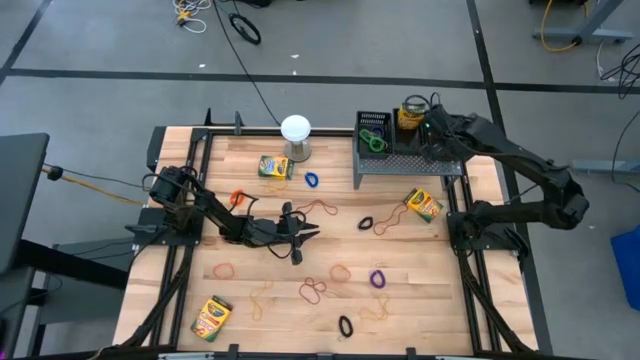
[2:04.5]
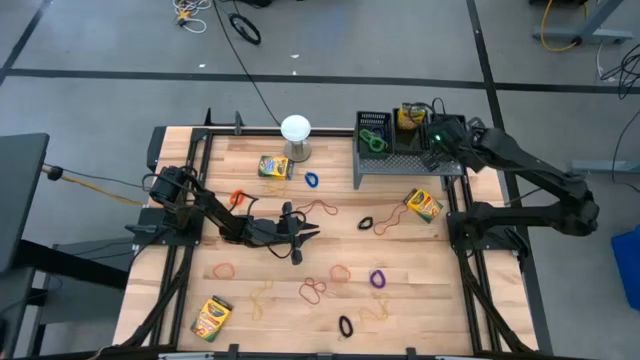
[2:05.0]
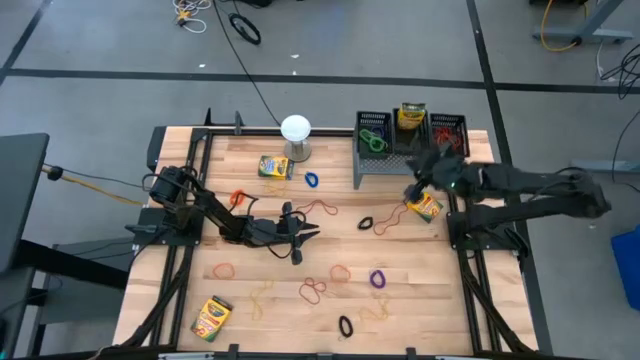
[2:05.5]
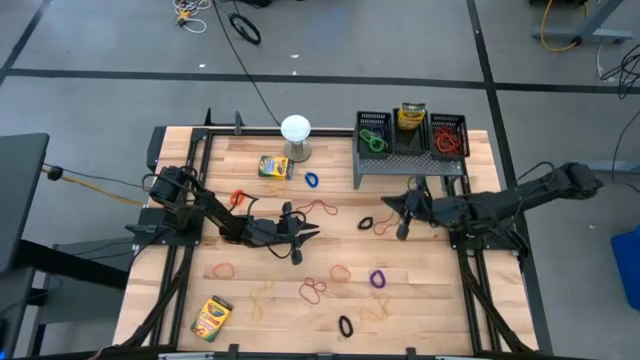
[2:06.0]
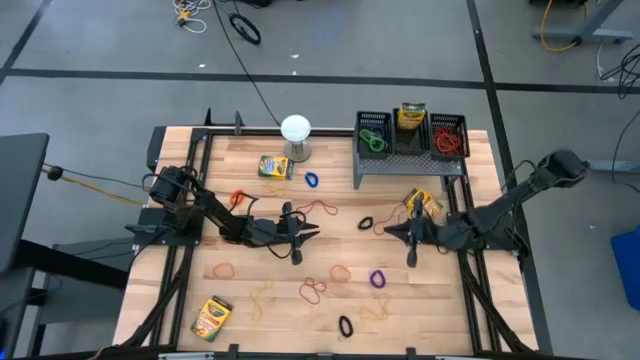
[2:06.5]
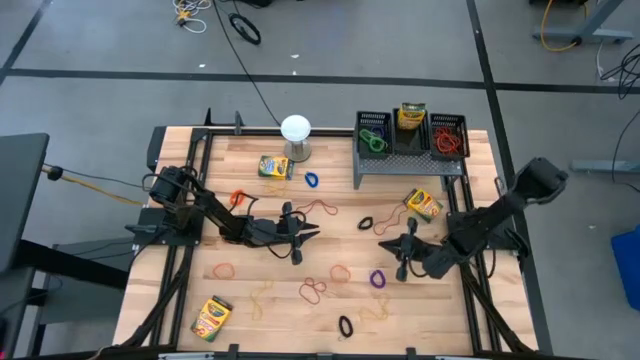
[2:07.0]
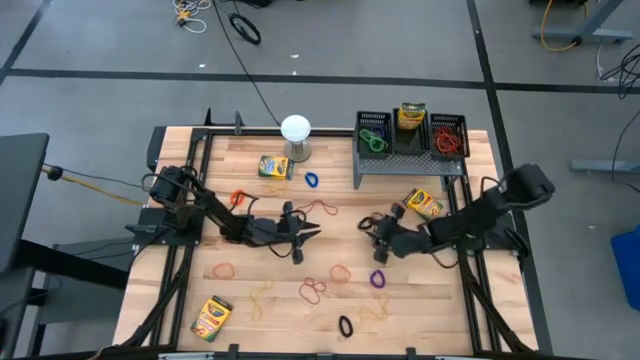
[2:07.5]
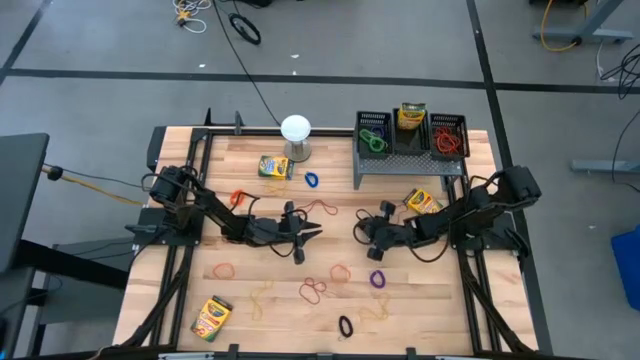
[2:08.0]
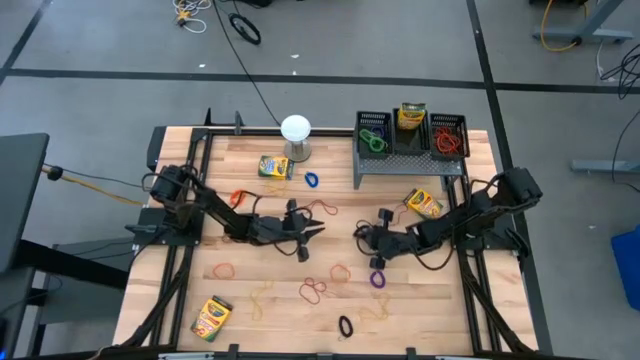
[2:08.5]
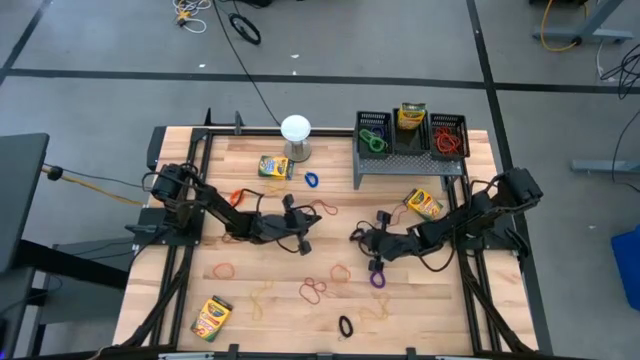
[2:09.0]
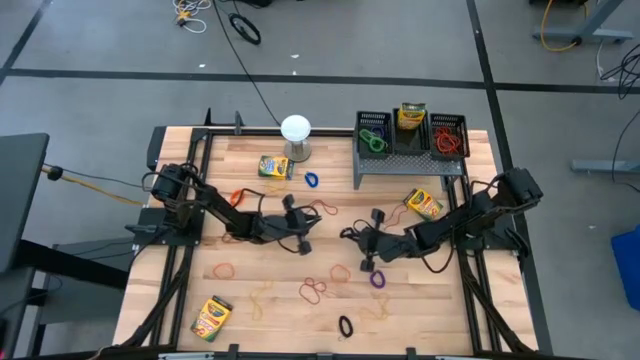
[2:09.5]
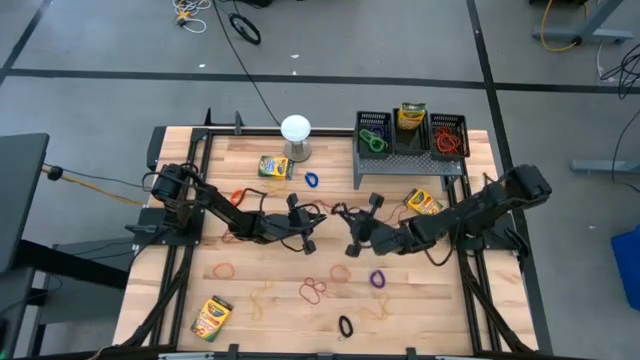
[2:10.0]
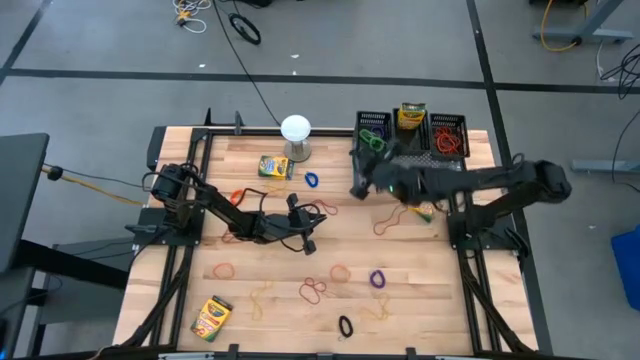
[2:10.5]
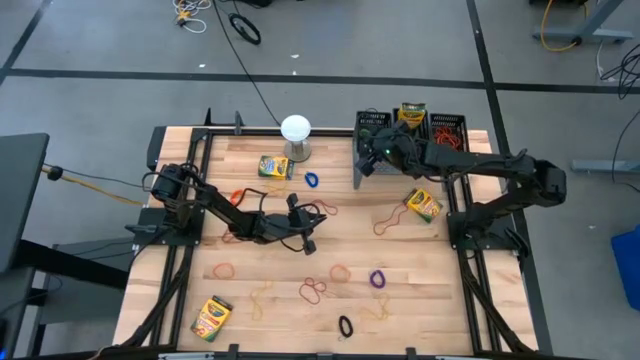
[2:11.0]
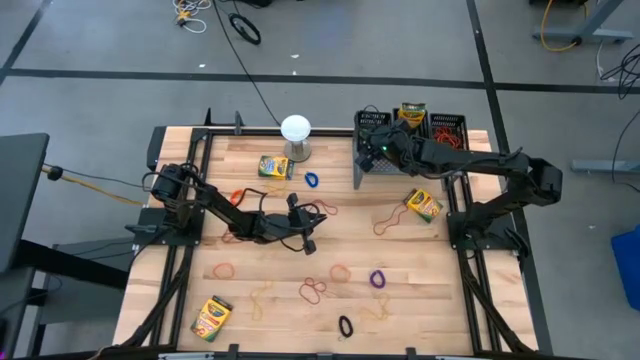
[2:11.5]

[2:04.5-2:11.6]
Task: Pick & Place Office Desk Supplies
Put the black spring keychain into the left black basket on the shelf

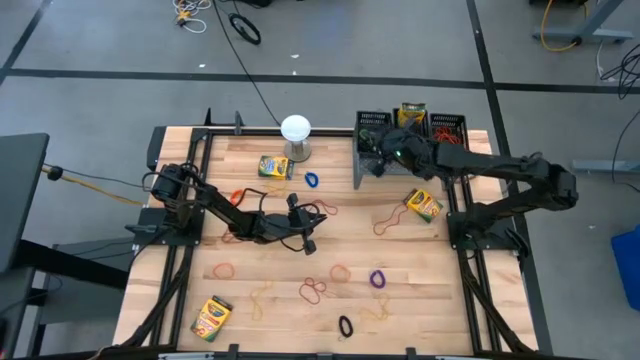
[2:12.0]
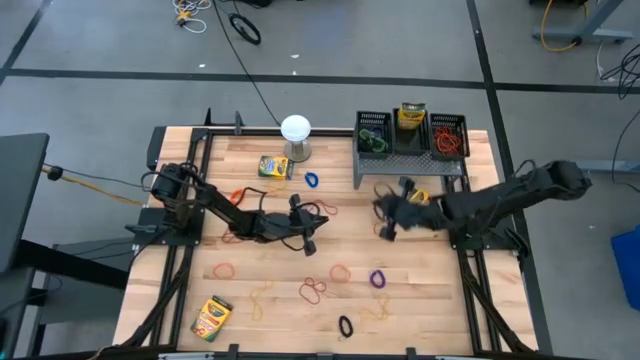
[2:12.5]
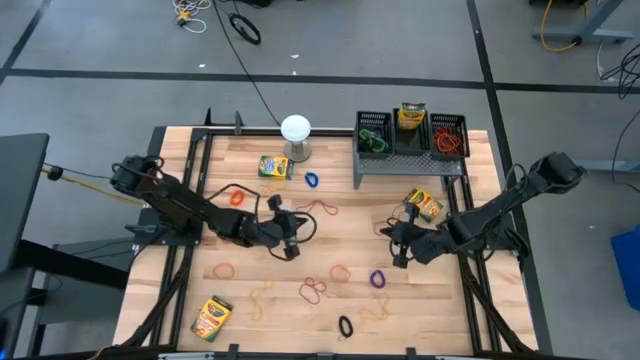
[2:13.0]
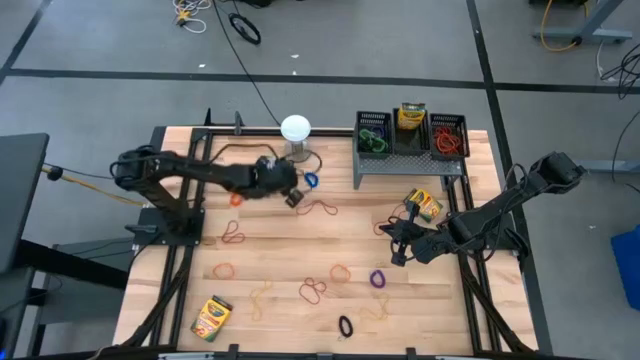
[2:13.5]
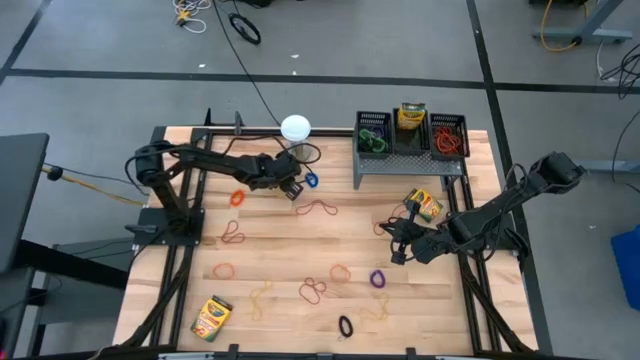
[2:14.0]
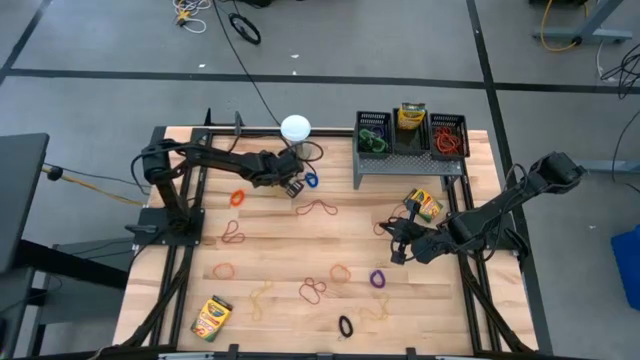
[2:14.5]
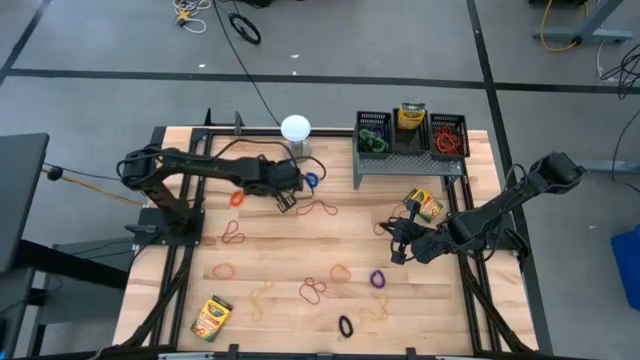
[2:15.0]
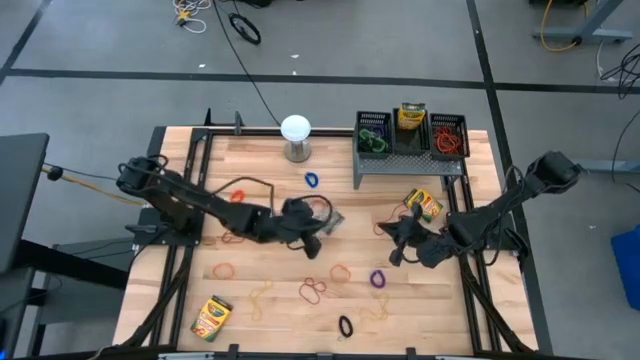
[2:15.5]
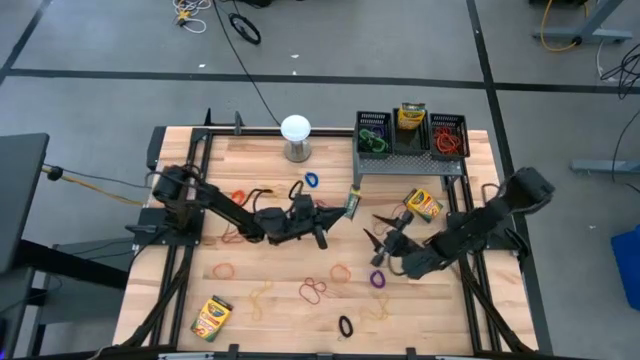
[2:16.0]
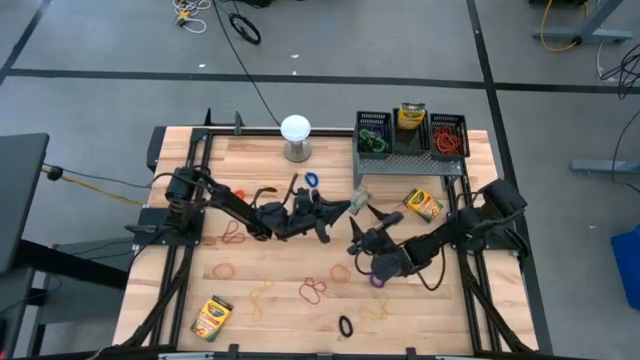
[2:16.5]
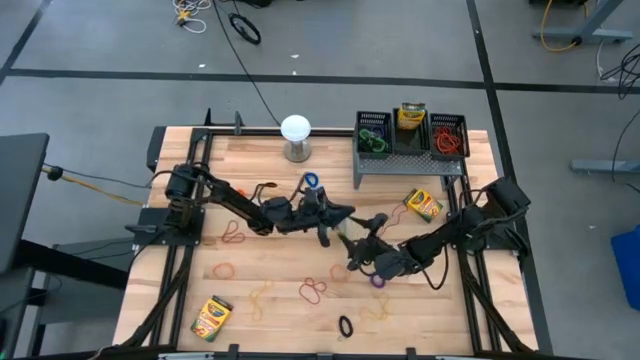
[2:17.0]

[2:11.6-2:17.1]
Put the yellow crayon box into the middle black basket on the shelf

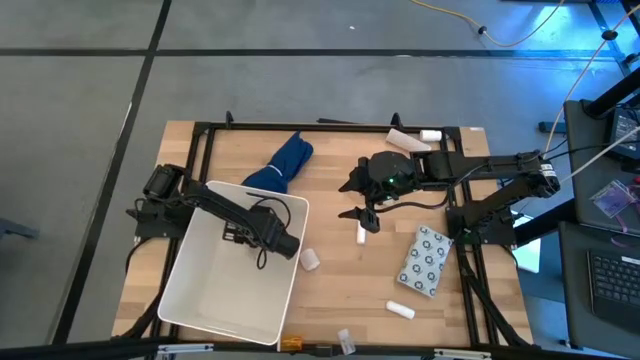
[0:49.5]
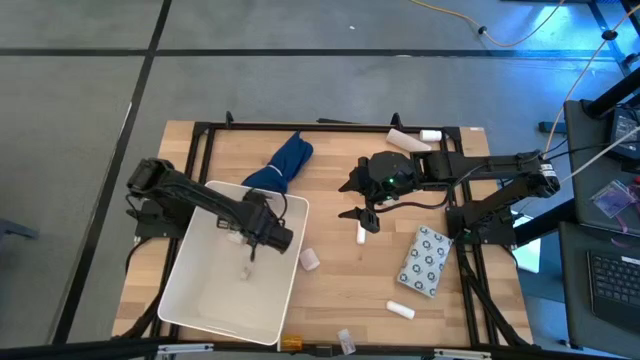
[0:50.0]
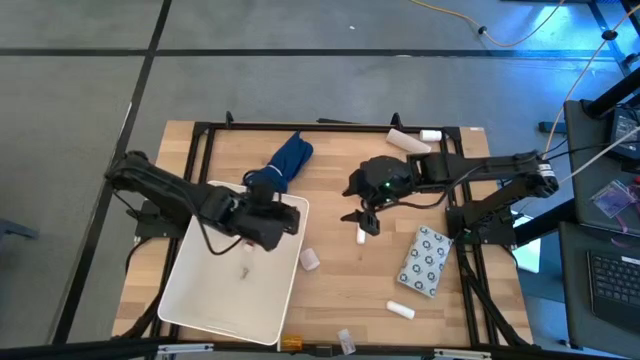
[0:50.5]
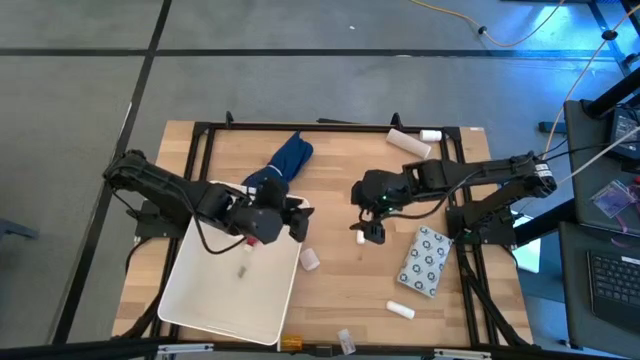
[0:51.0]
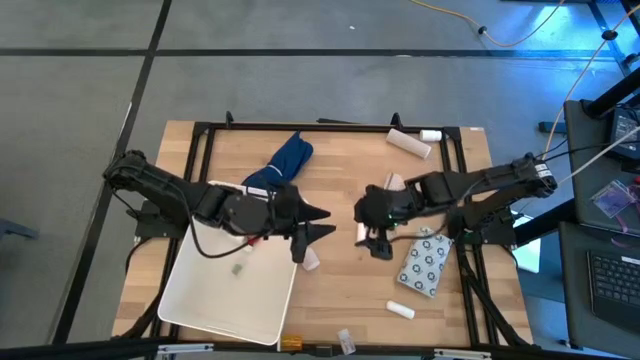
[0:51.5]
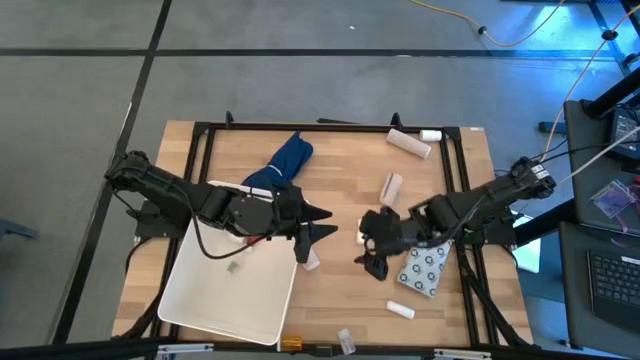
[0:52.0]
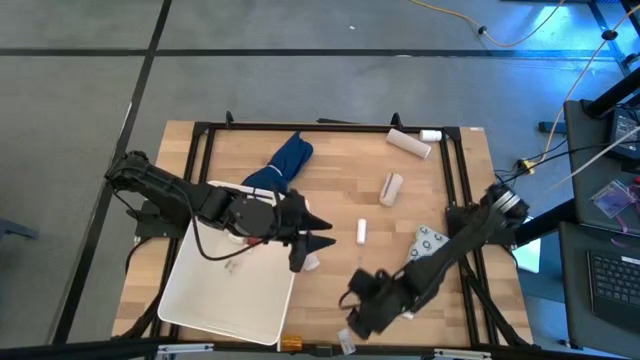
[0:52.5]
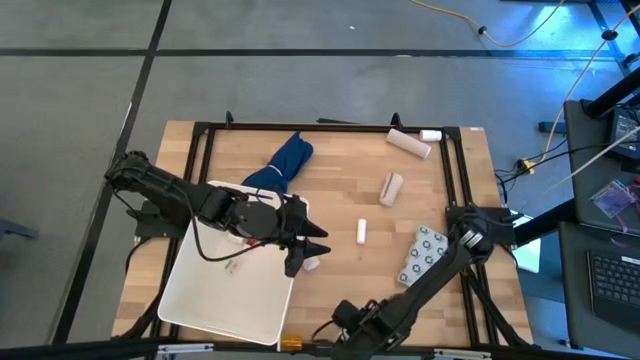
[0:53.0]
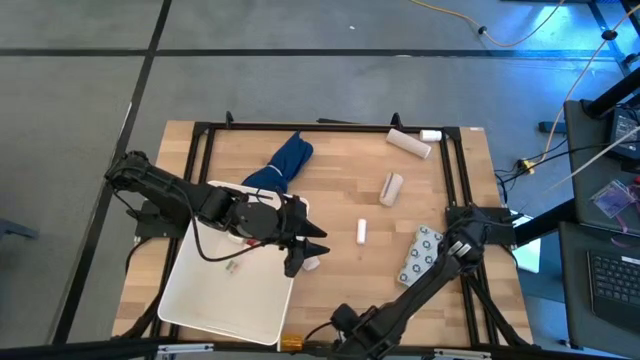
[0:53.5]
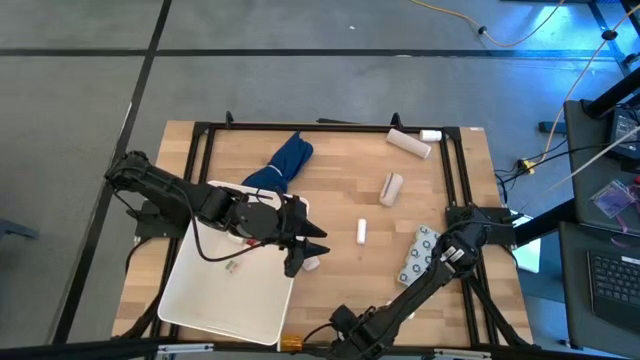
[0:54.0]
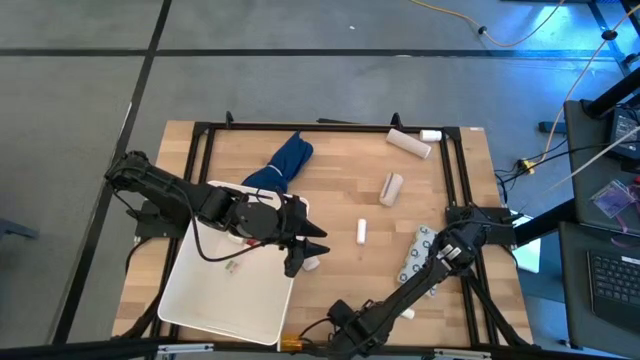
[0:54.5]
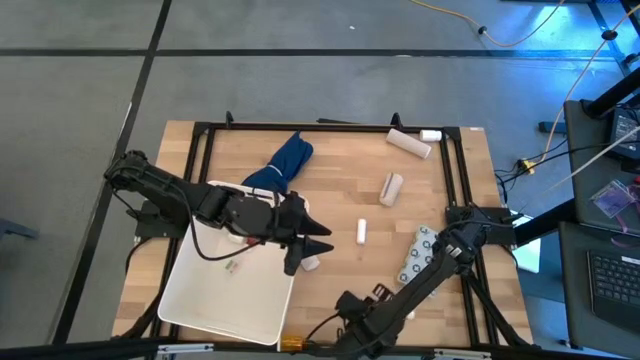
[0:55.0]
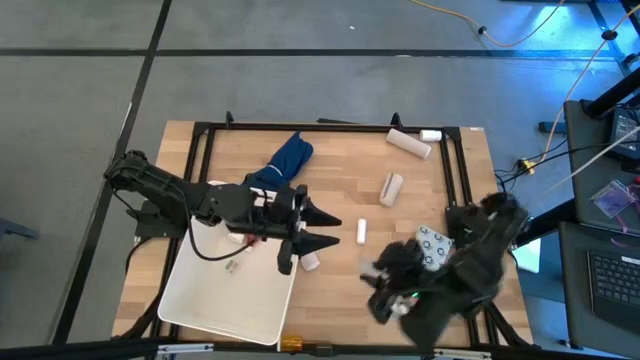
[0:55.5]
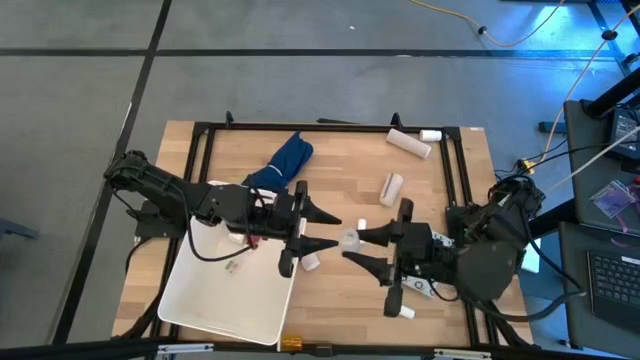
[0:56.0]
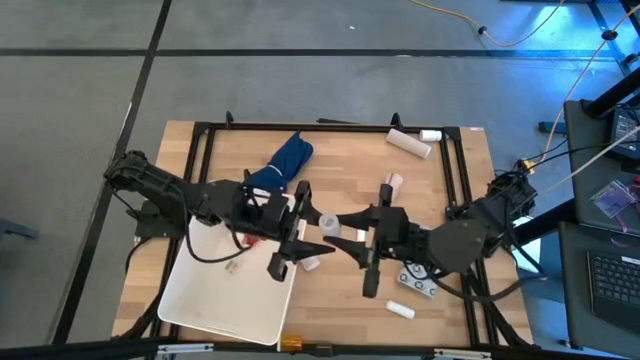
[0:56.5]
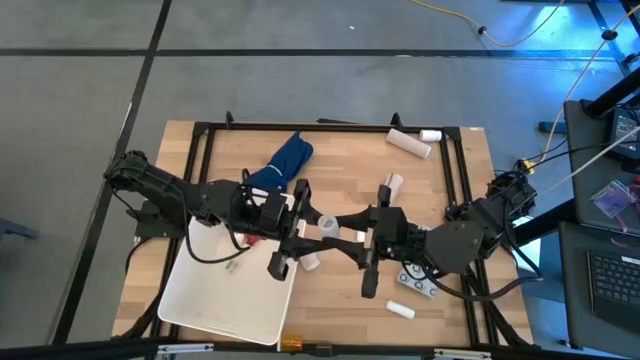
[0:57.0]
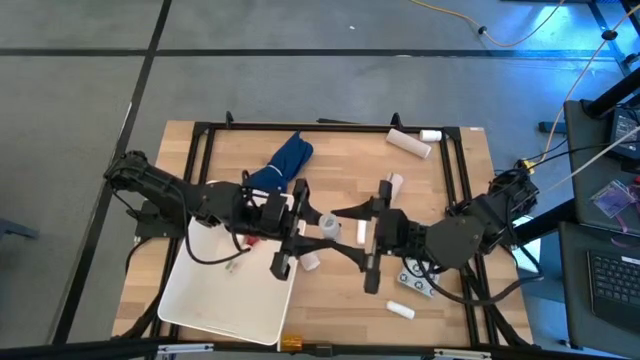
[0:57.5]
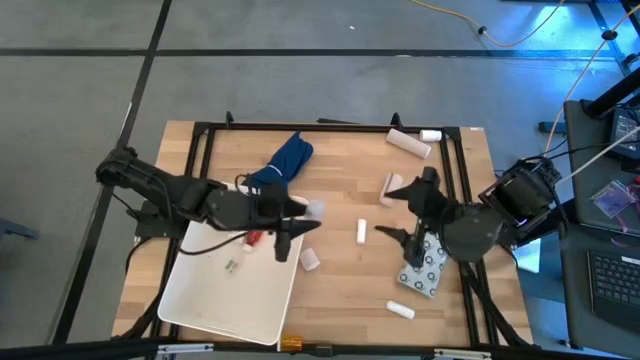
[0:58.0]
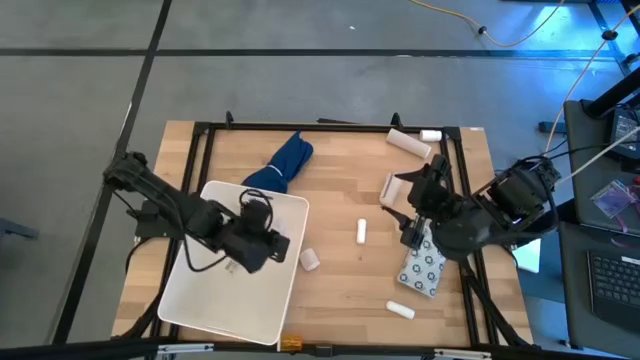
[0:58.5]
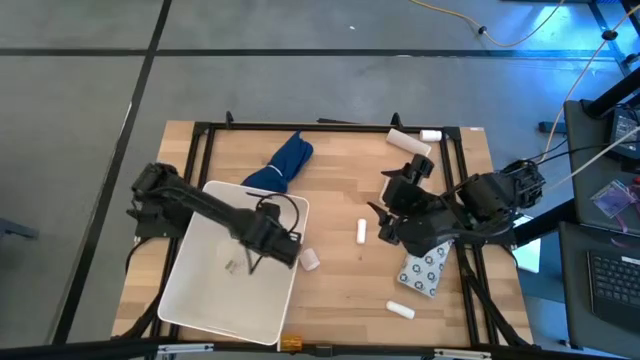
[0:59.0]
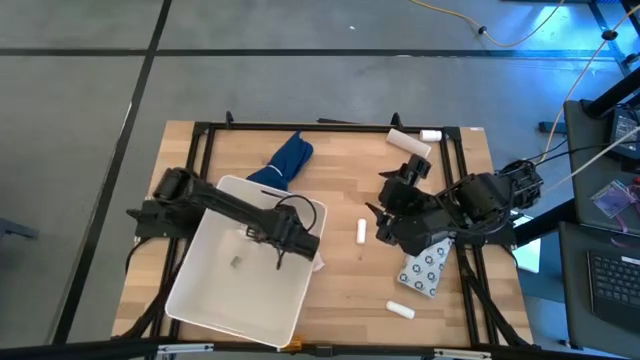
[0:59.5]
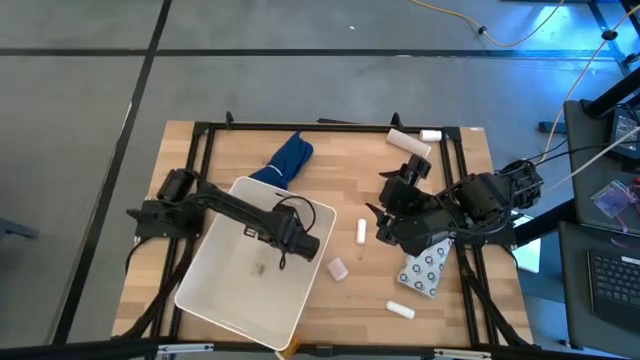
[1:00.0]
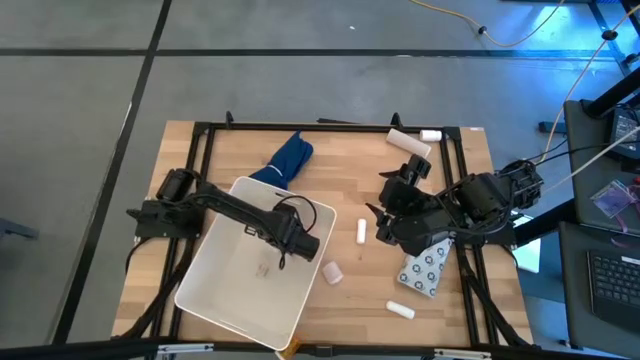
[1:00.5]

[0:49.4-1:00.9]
Task: Pick & place medical supplies in basket/bin
Put the transparent medicine bottle into the white bin
